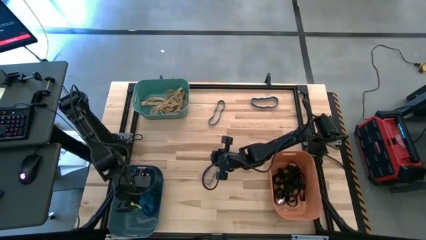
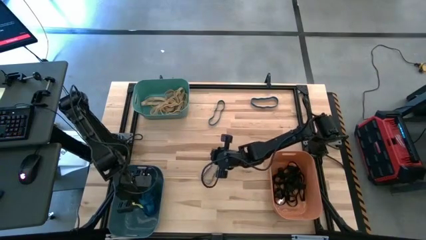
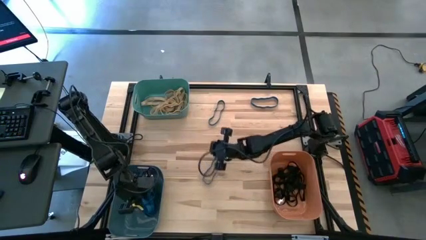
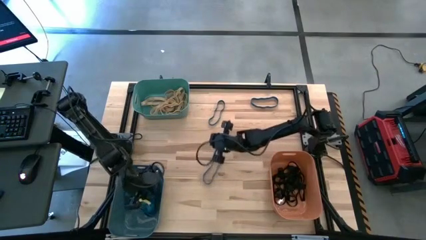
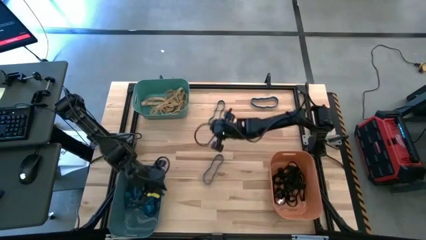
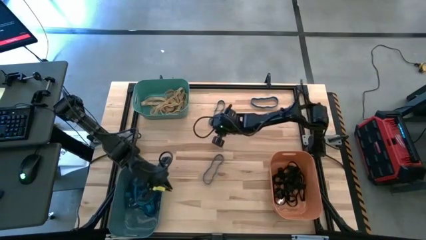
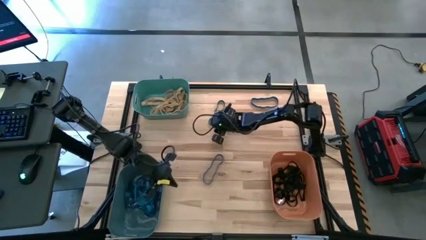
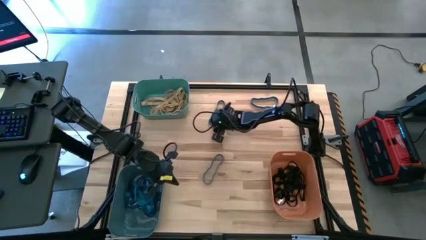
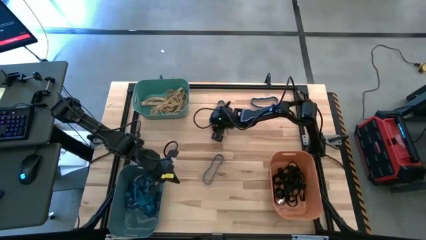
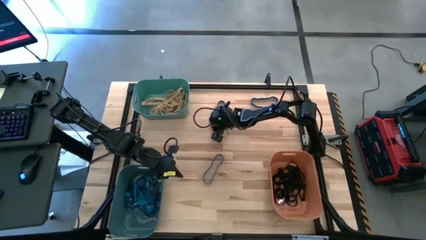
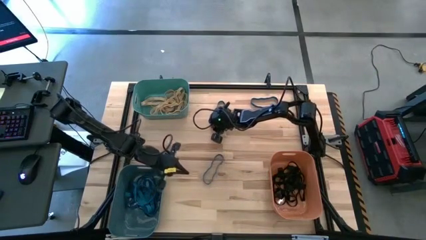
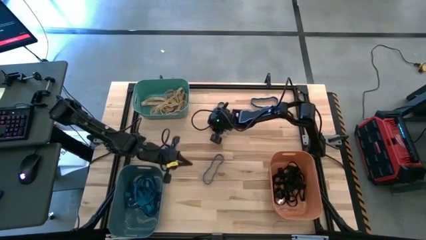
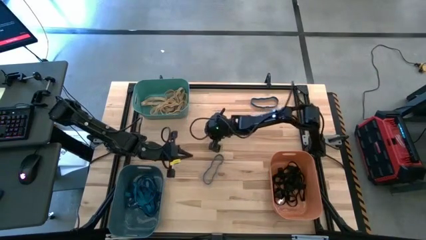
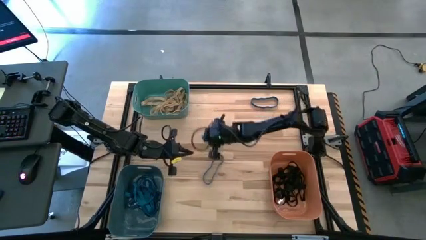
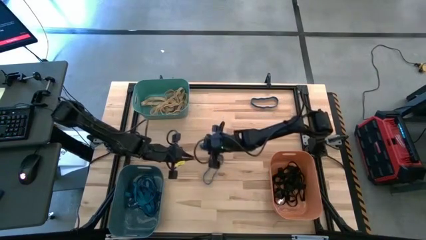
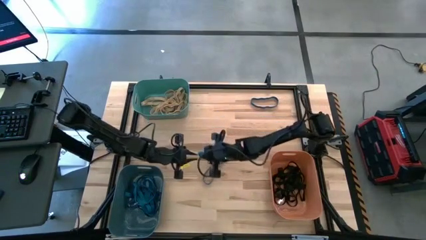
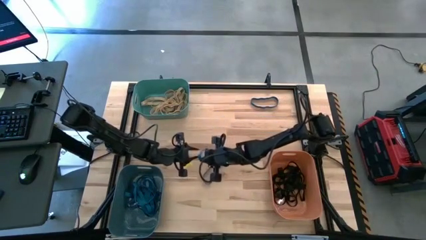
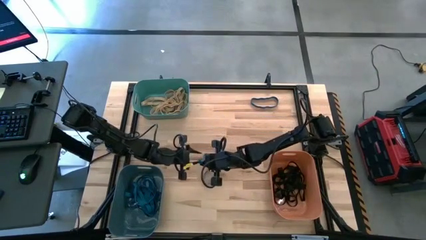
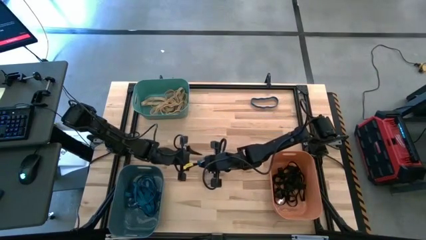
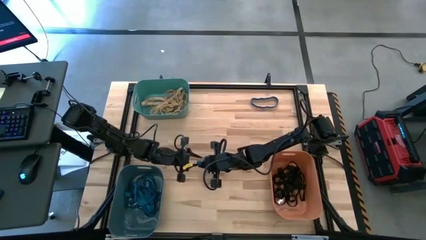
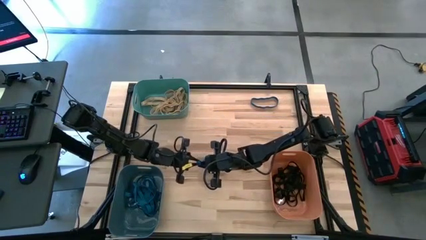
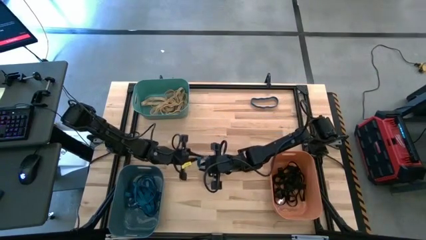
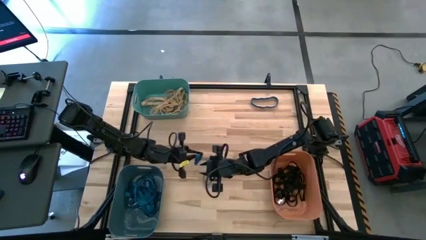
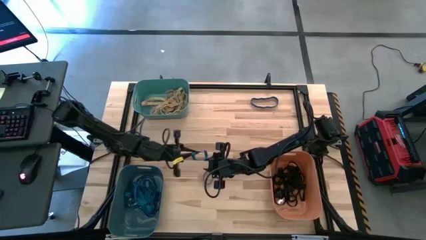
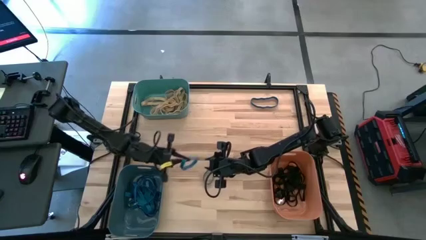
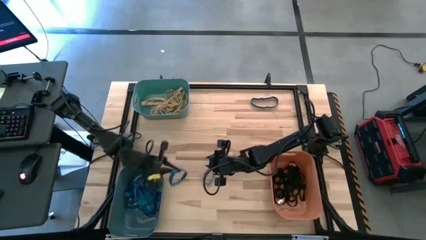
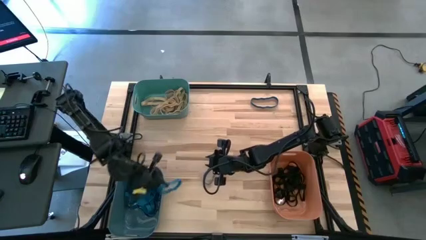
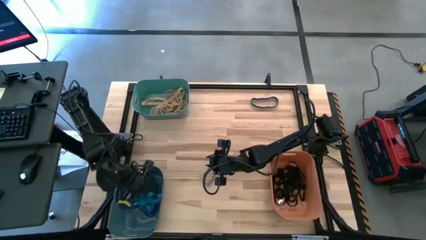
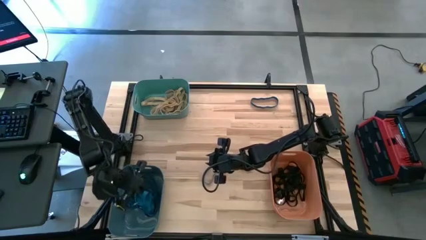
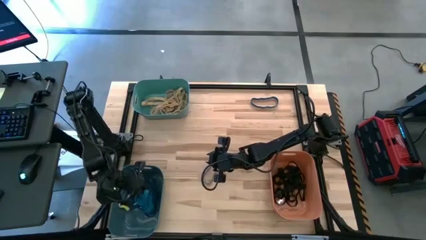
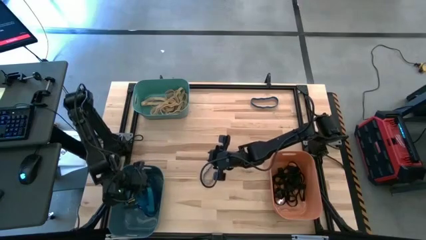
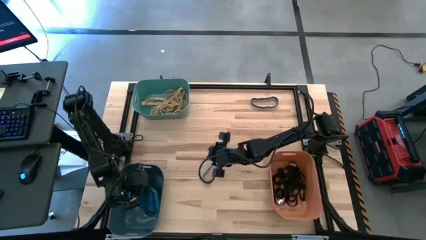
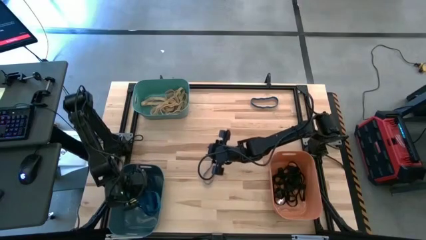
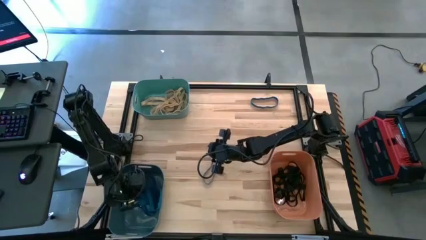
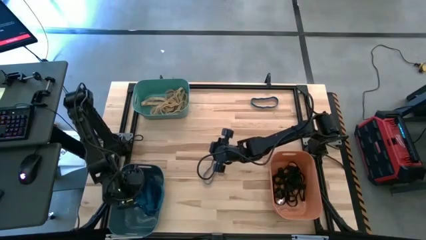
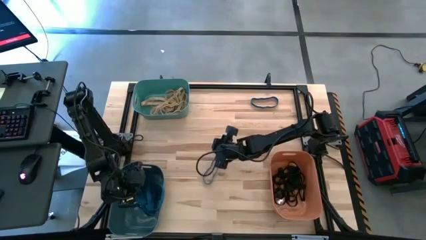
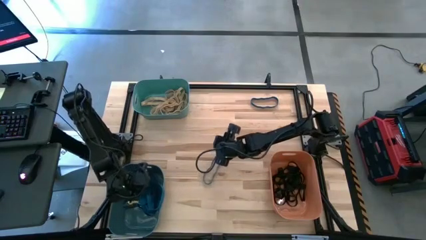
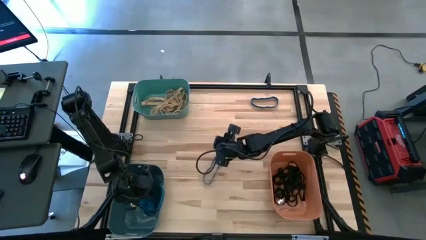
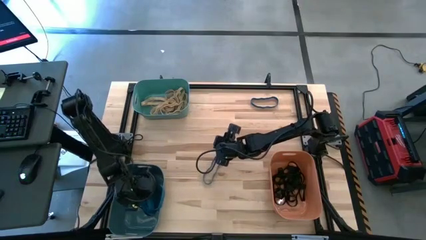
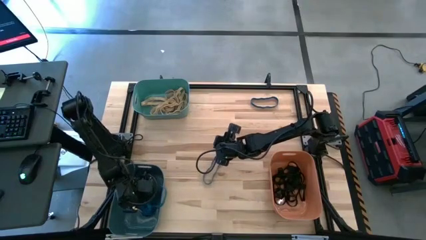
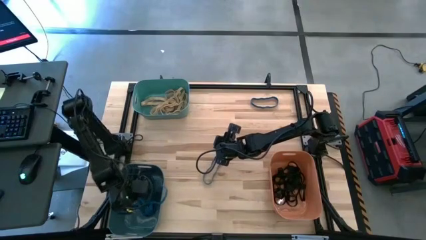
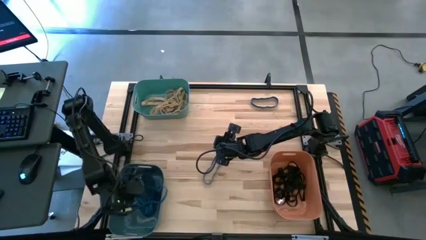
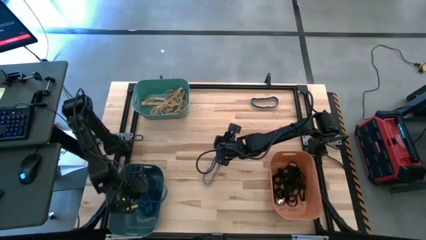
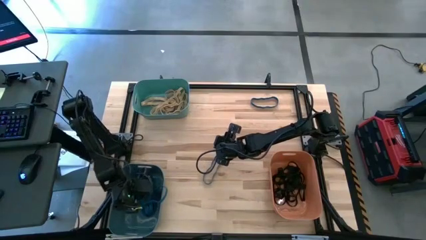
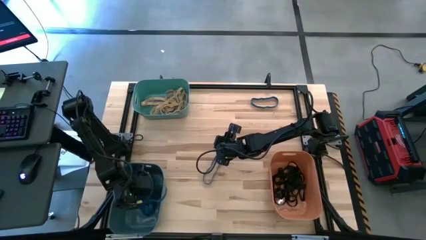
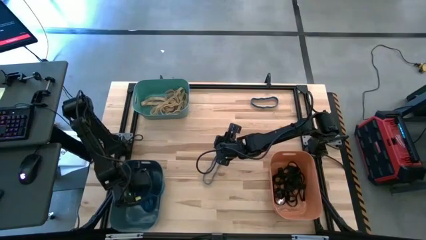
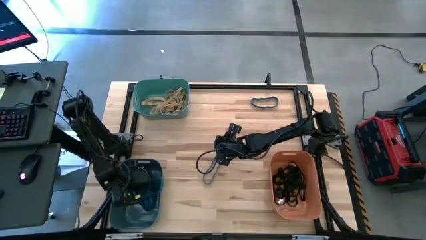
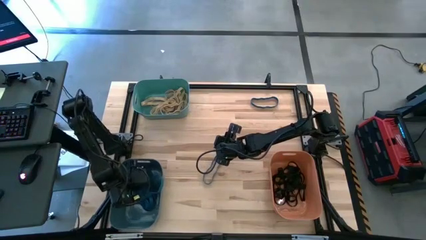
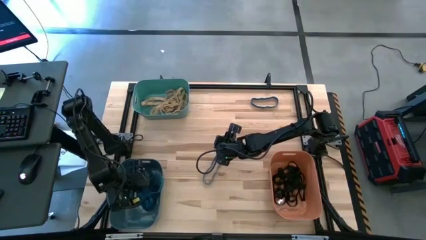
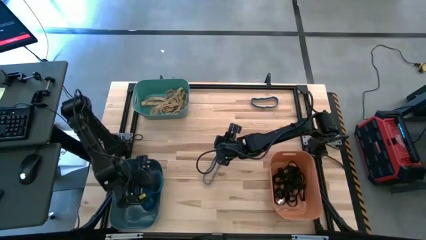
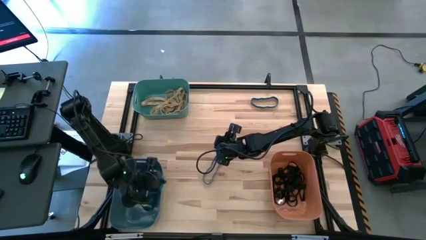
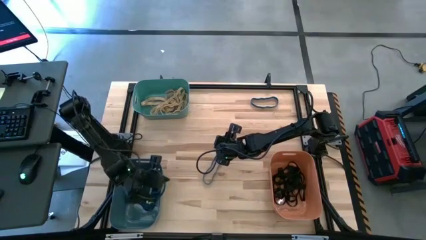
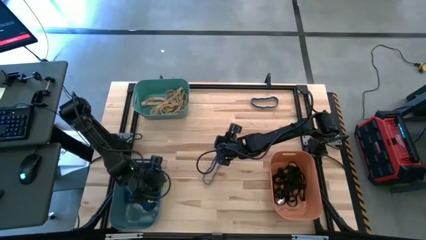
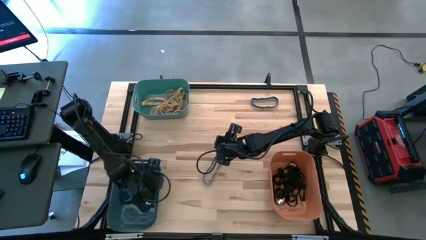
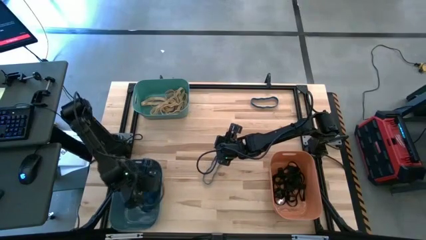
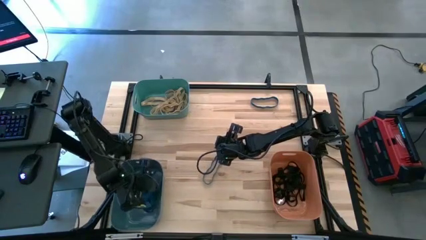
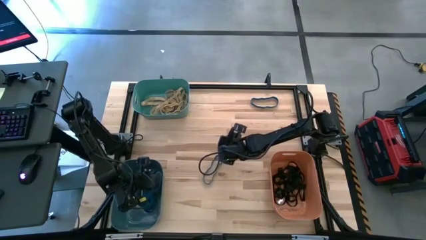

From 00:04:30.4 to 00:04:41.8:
Task: Sort rubber bands into baskets
Put the blue rubber band into the blue bin

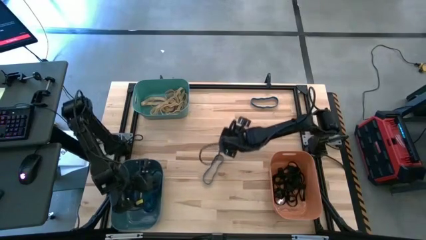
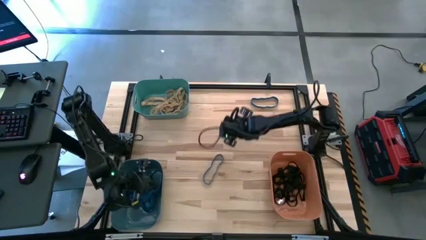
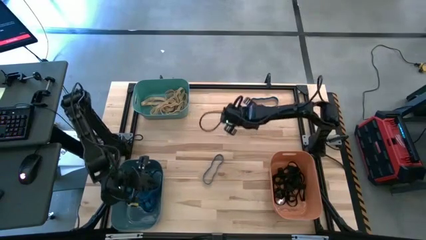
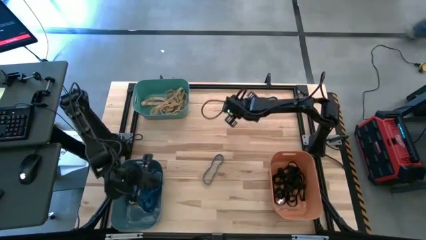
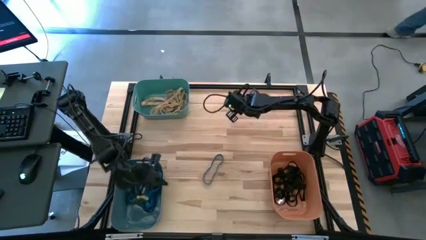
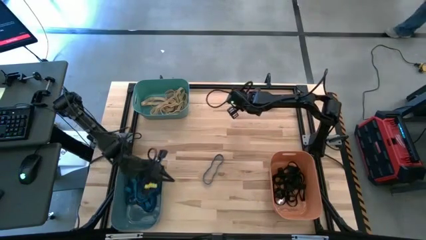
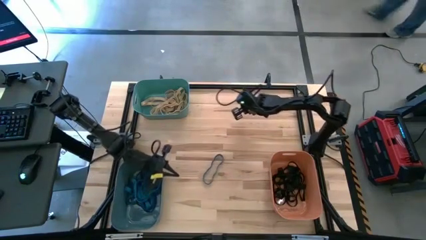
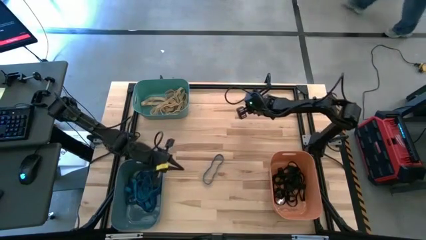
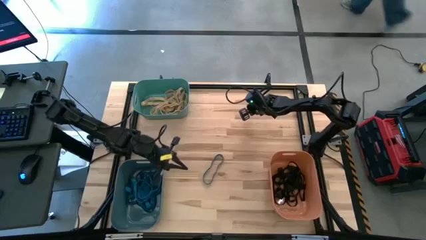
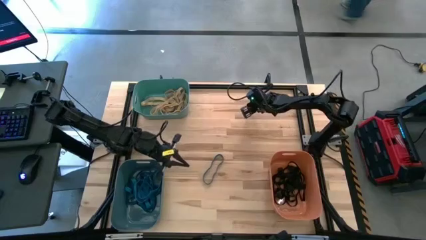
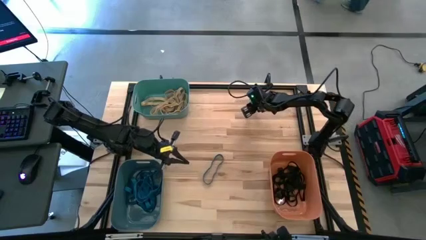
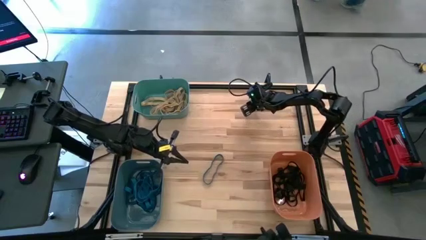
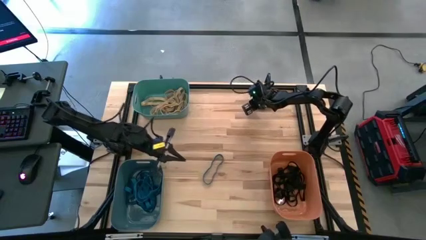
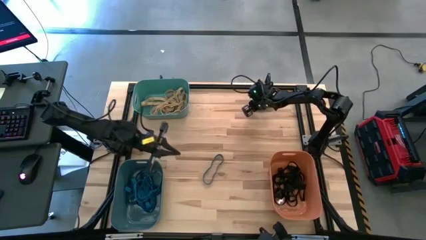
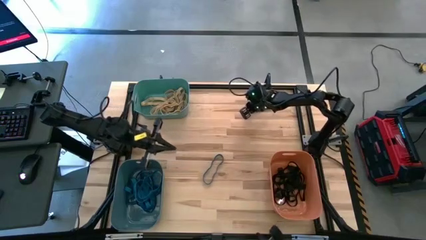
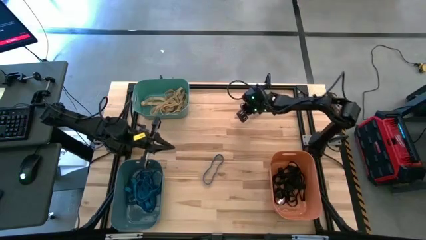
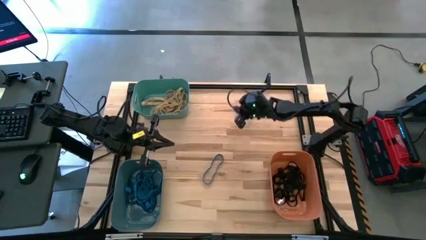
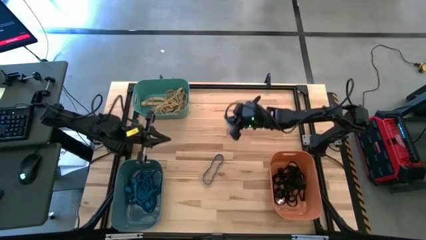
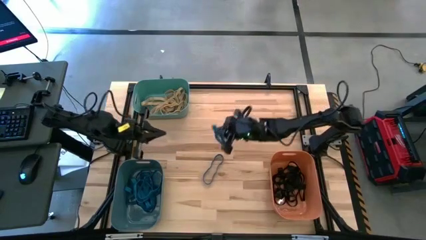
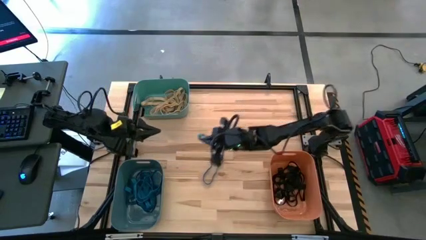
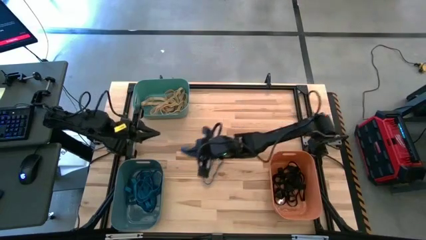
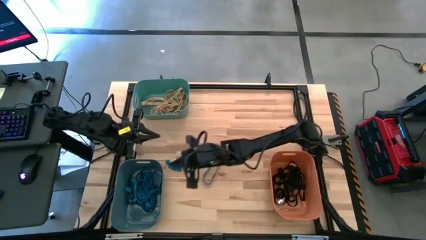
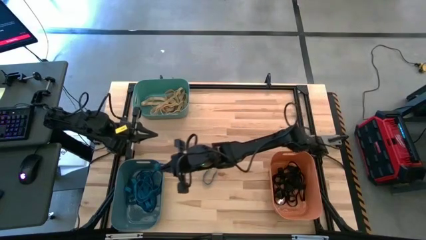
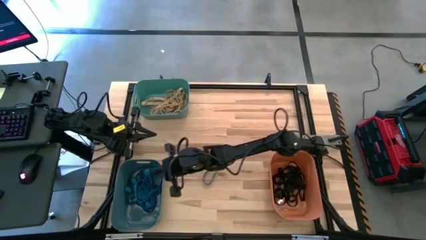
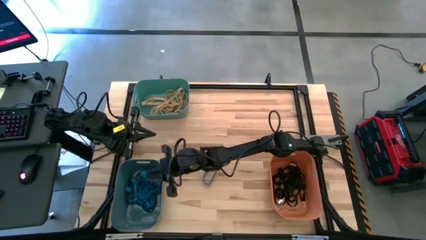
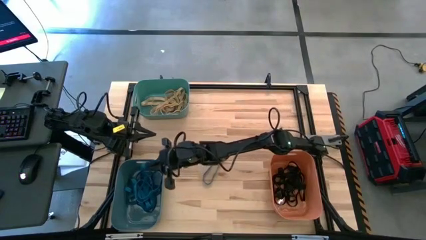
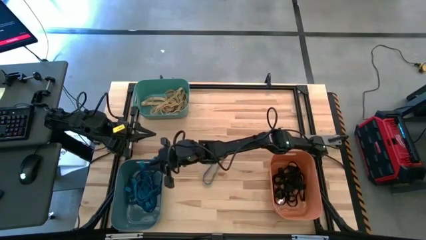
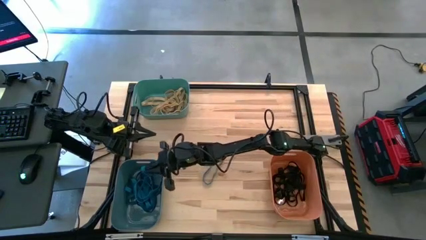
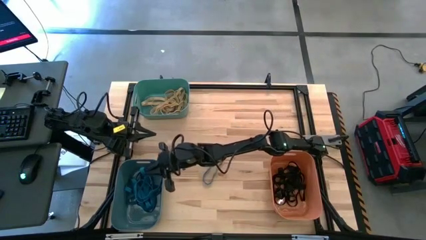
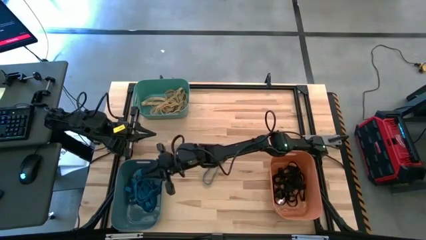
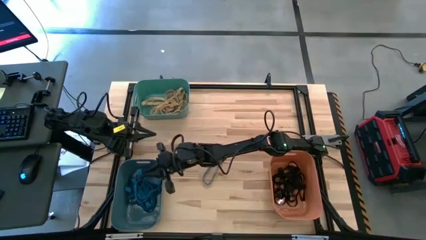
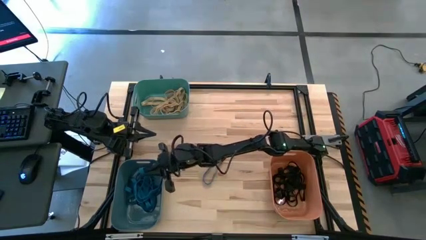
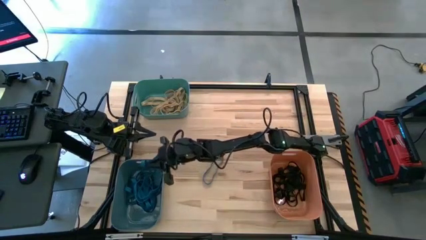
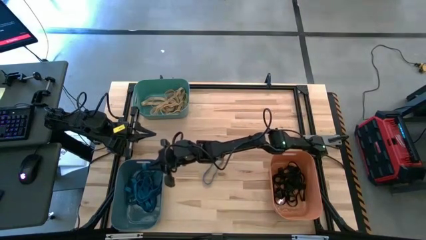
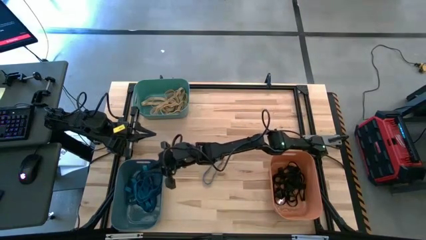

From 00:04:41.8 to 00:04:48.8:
Put the blue rubber band into the blue bin
